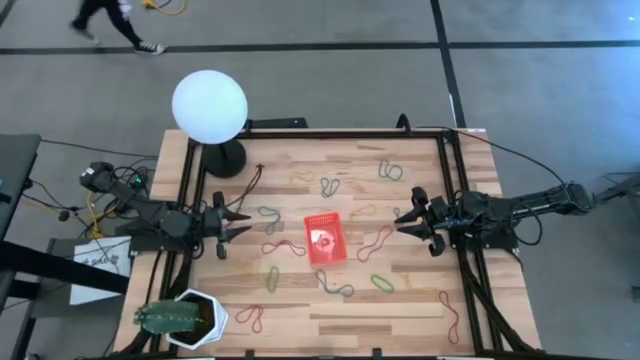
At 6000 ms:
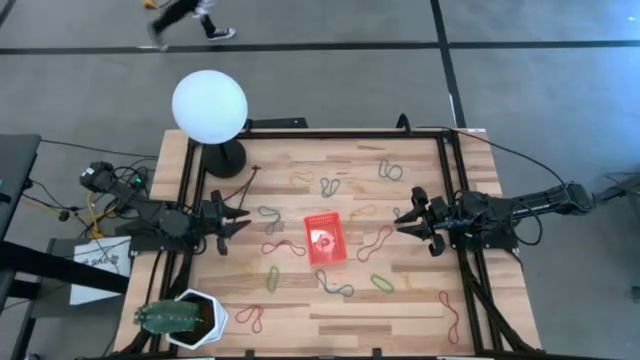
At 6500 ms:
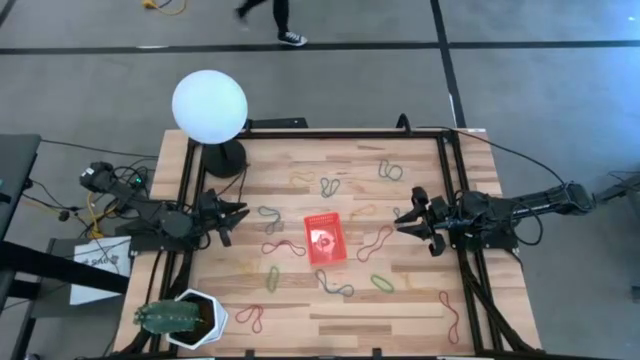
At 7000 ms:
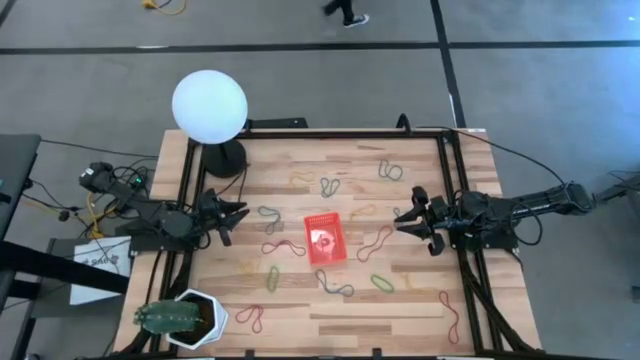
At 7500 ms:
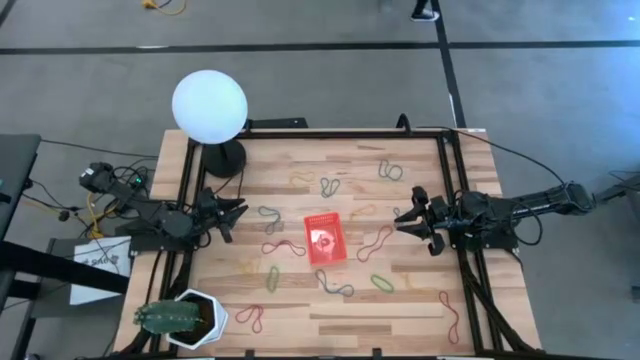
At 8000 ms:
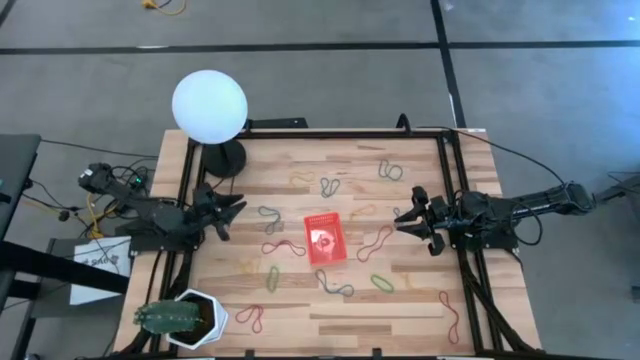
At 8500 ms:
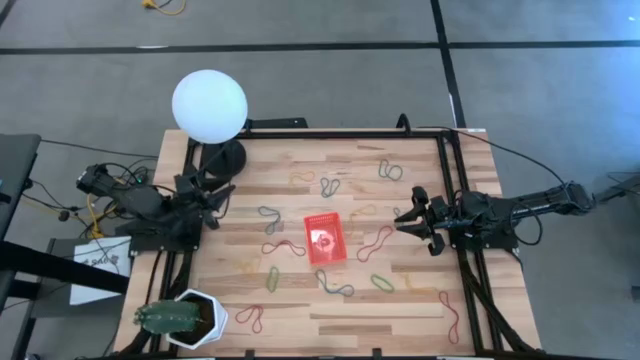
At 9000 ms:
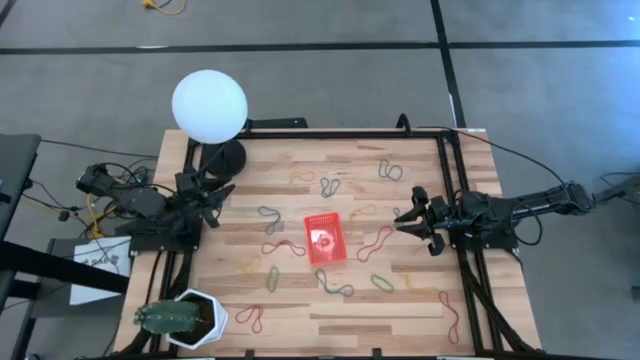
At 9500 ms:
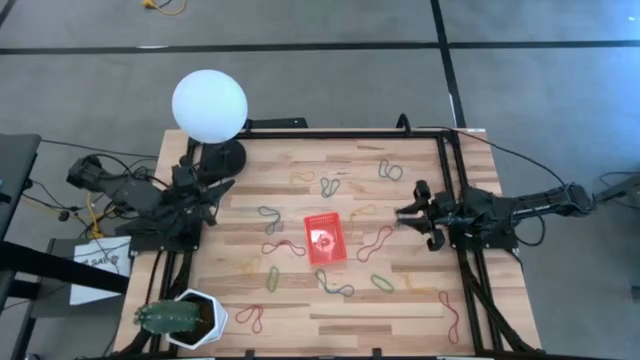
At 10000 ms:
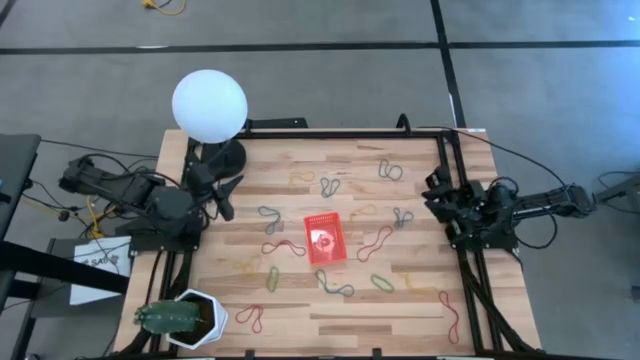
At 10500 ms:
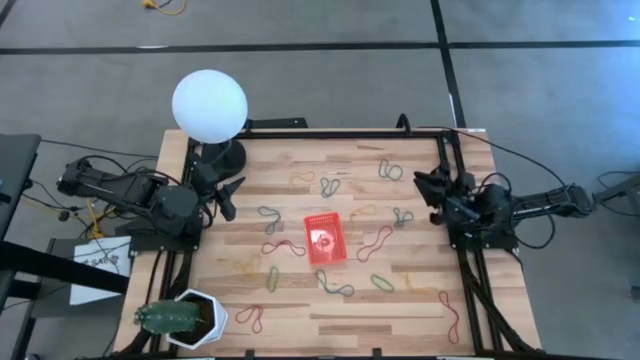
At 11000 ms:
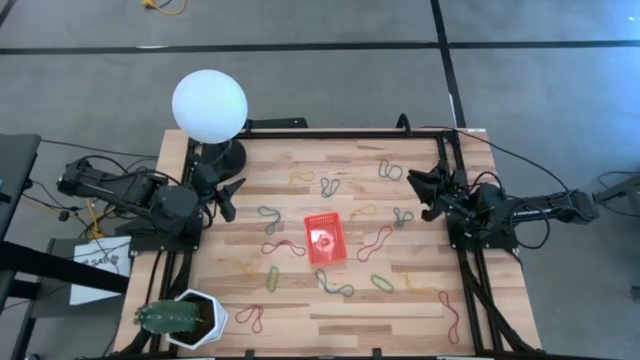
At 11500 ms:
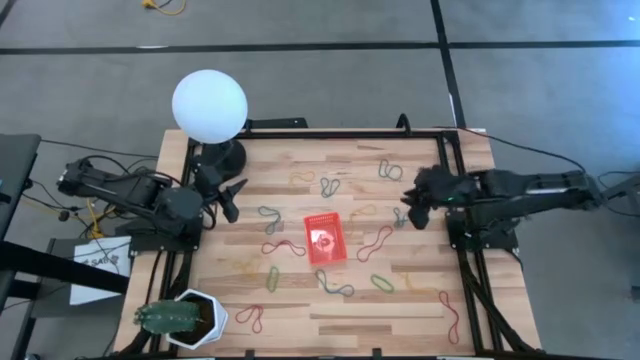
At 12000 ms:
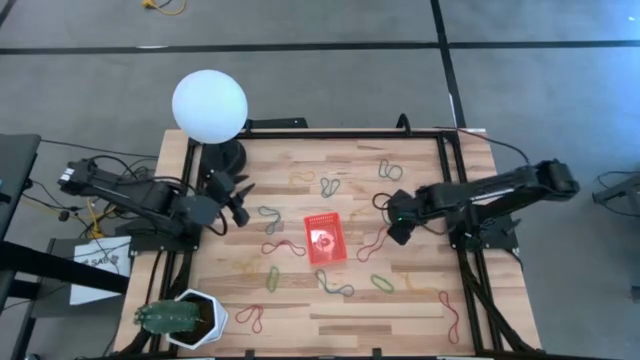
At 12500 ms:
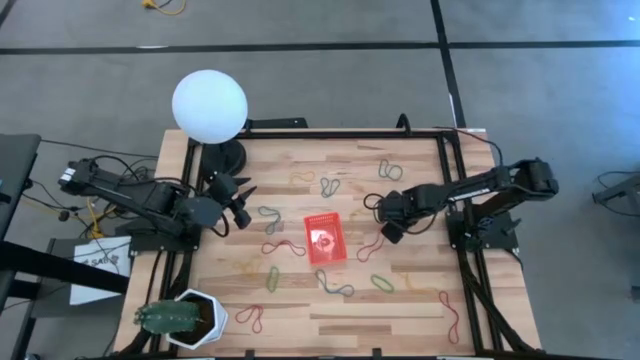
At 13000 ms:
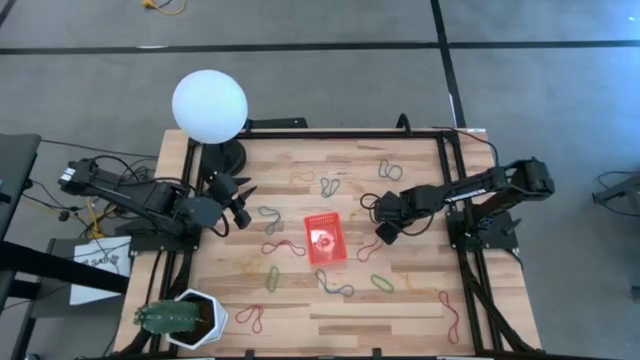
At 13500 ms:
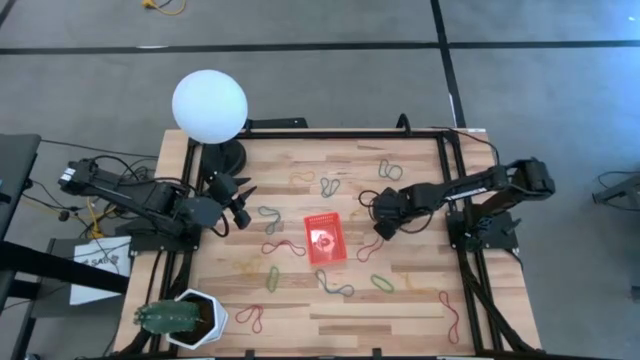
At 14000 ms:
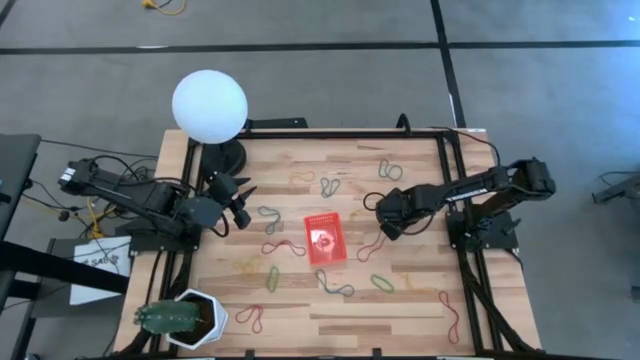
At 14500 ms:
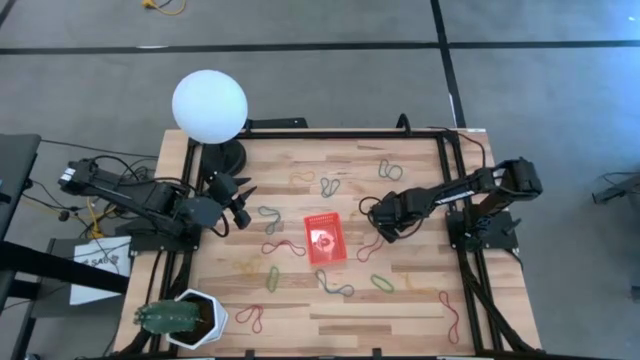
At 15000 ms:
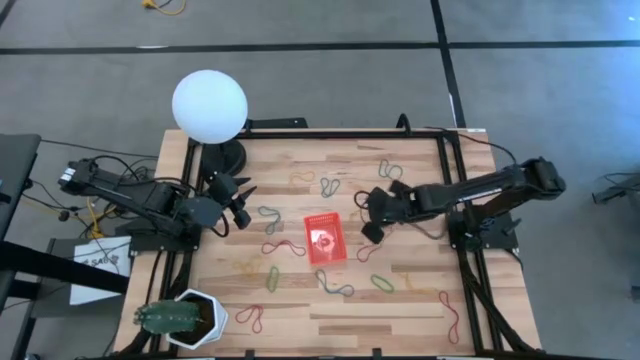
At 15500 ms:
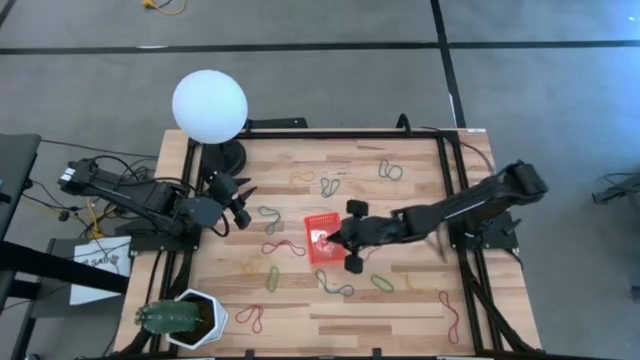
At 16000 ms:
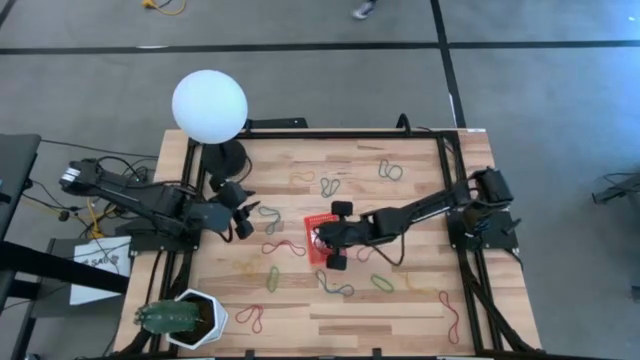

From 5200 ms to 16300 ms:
Task: Pick and place items into bin
Put the blue rubber band into the orange bin

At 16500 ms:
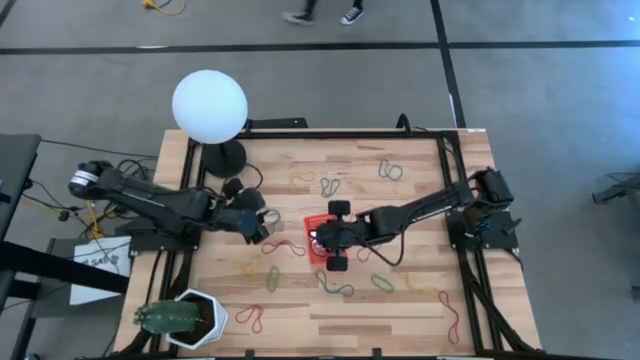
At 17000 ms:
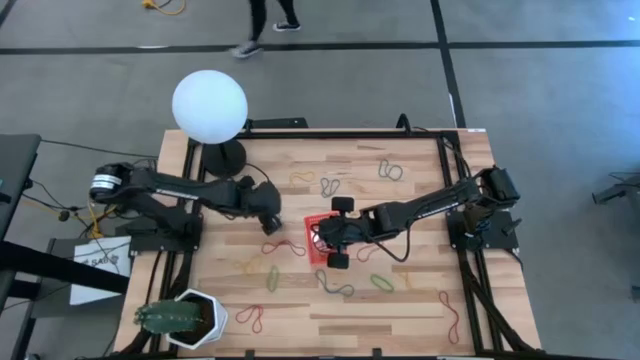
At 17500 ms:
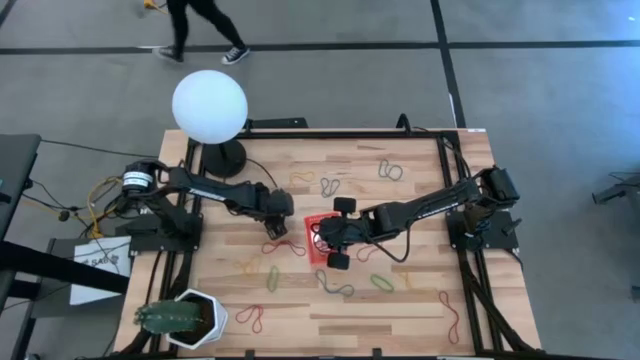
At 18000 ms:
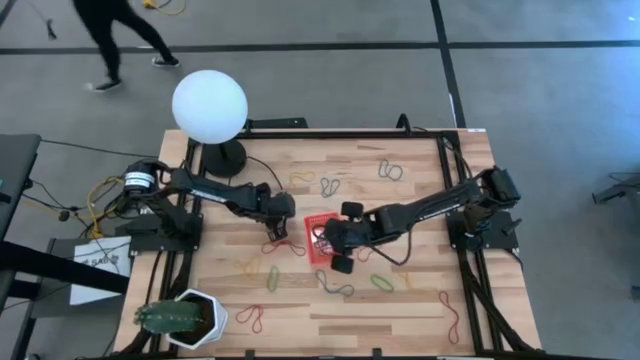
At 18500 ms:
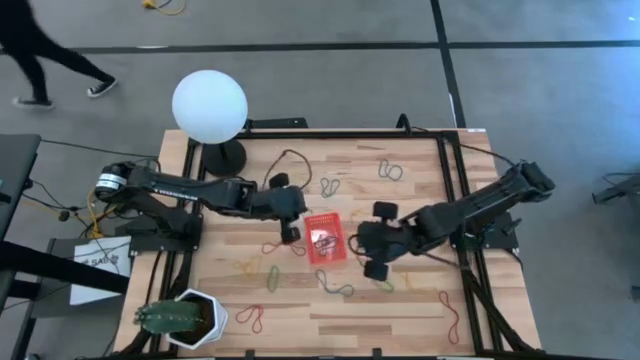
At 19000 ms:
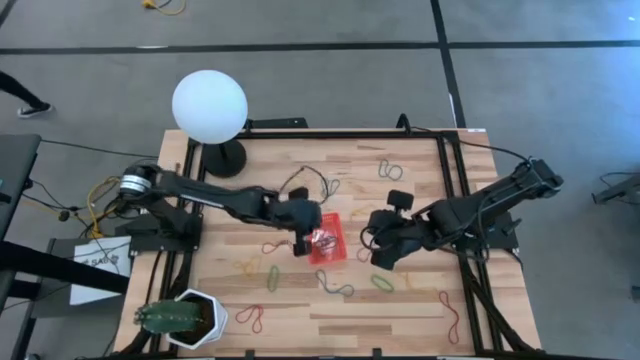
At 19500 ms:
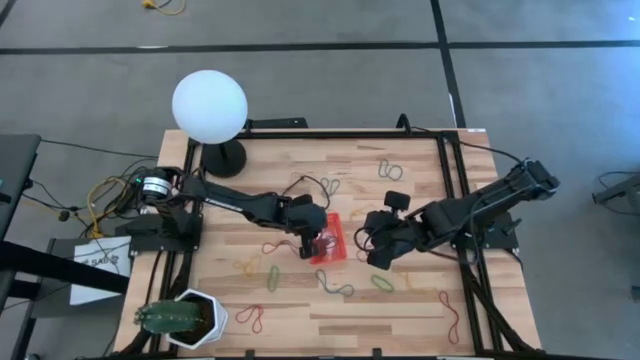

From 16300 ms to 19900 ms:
Put the blue rubber band into the orange bin

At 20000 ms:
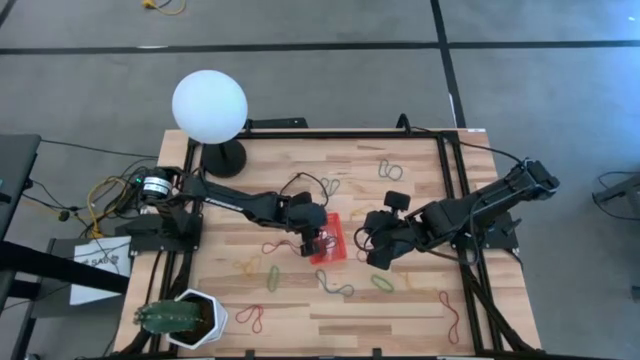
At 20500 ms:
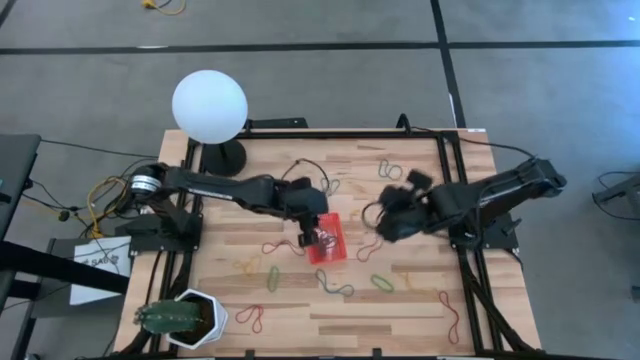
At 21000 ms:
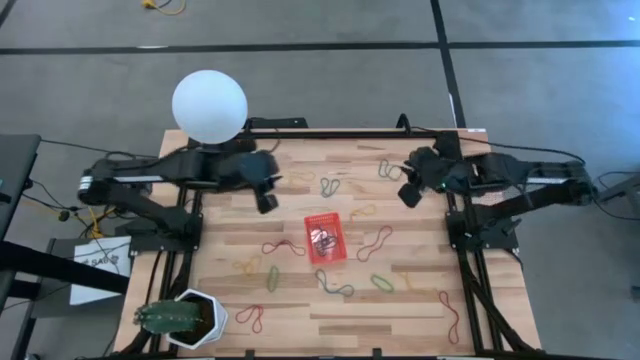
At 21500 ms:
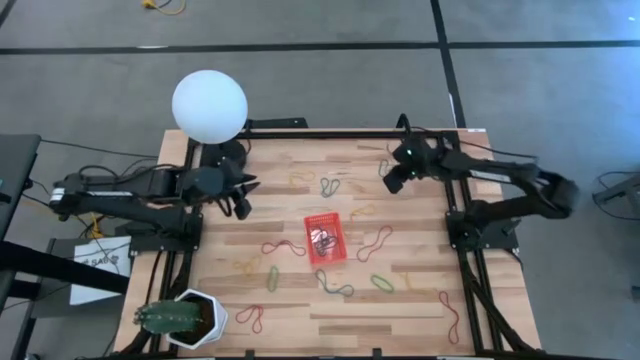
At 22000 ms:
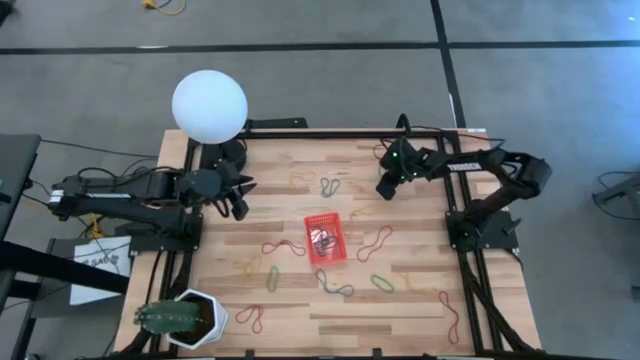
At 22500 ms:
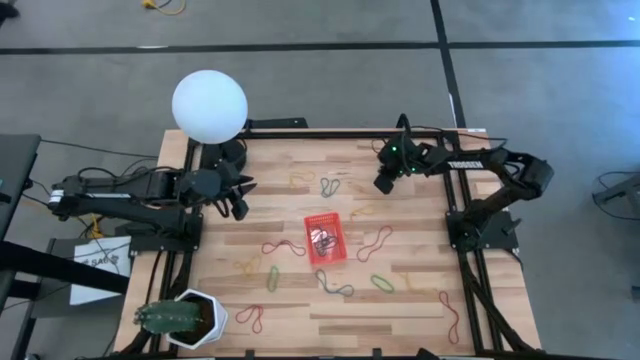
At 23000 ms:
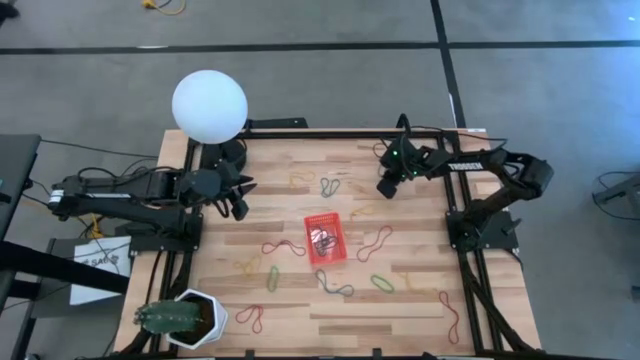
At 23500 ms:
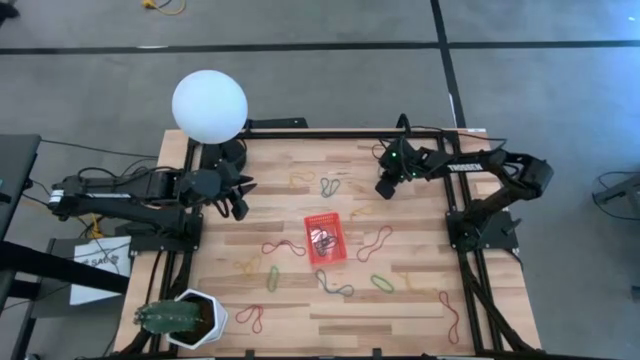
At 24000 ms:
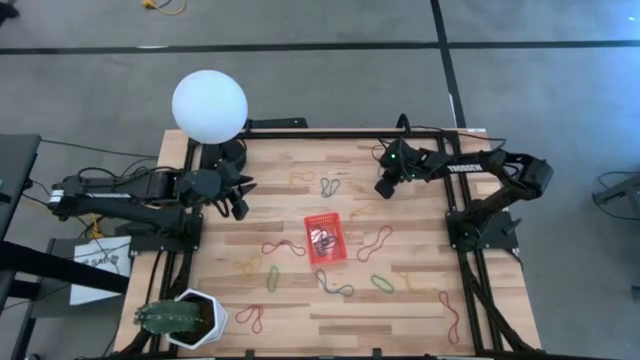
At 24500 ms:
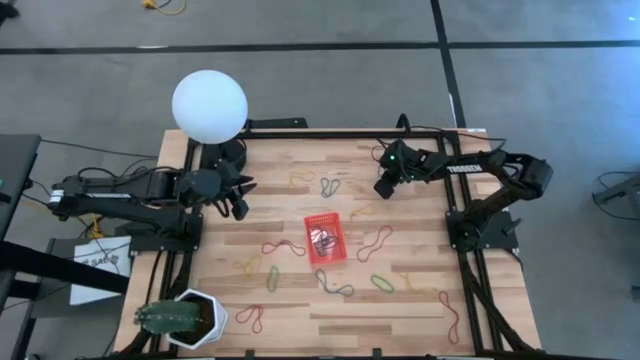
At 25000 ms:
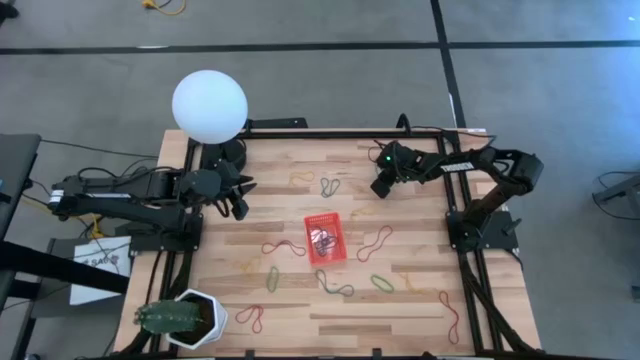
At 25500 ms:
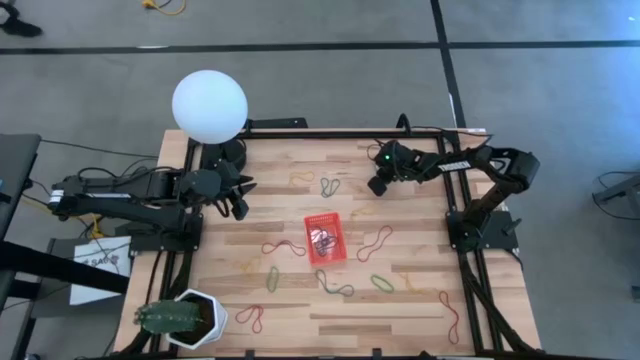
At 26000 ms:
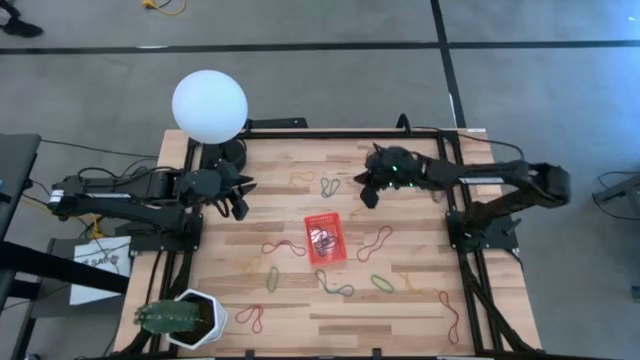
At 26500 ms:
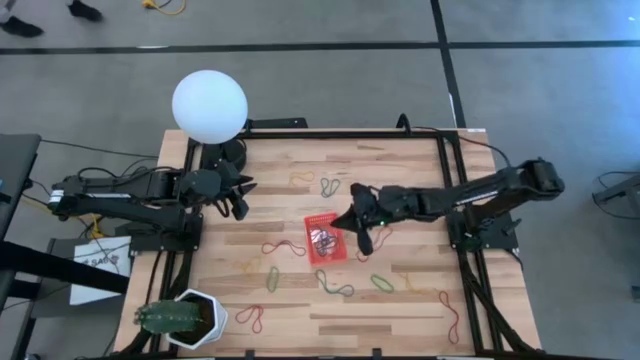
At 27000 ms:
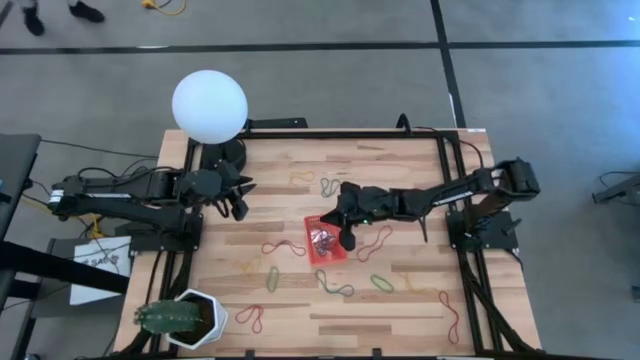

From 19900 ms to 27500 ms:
Put the blue rubber band into the orange bin
